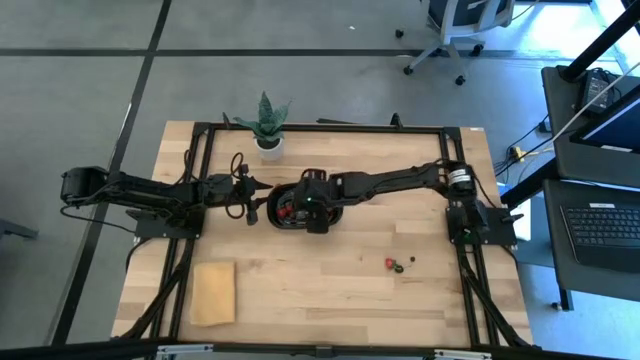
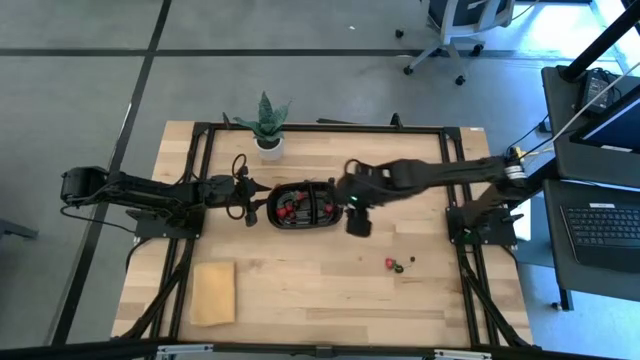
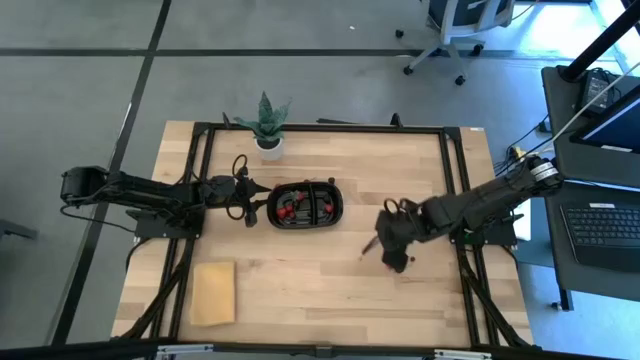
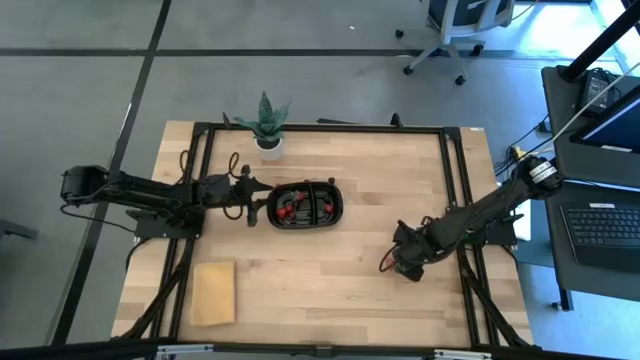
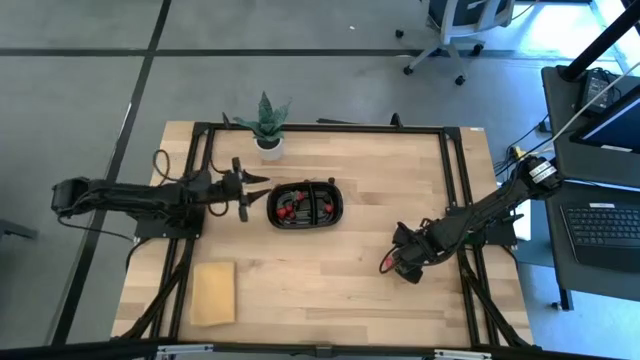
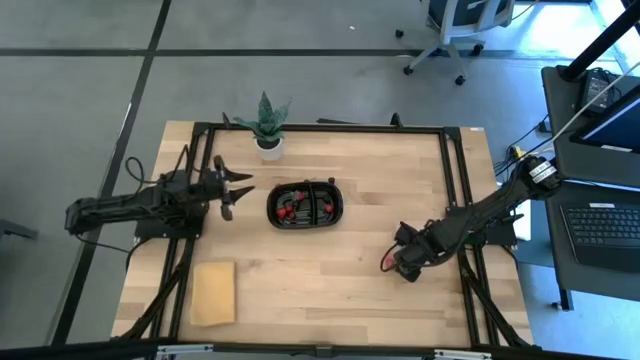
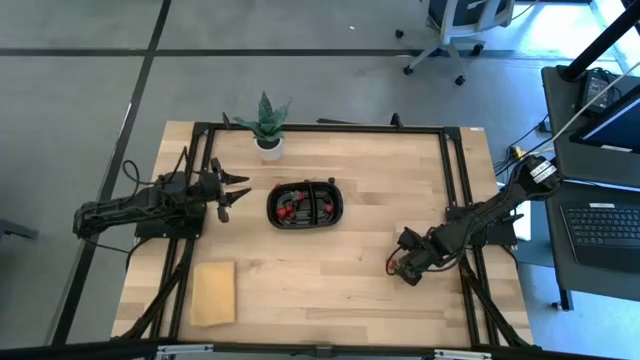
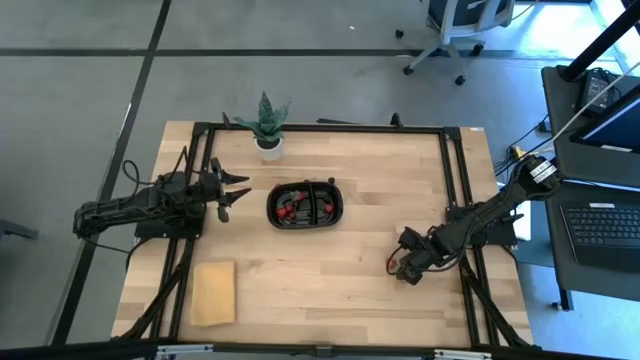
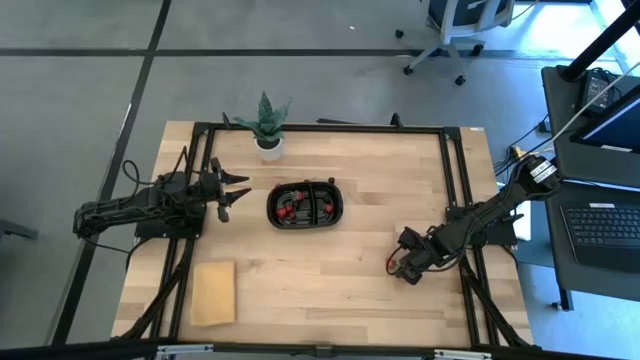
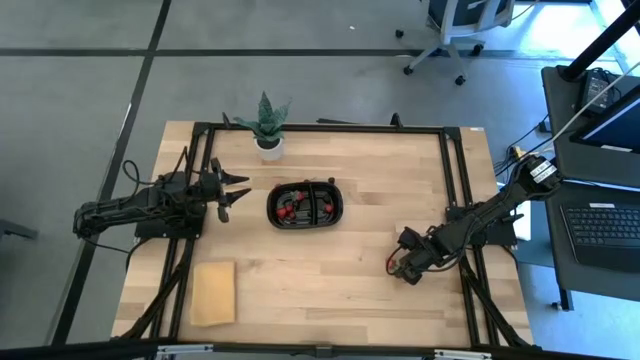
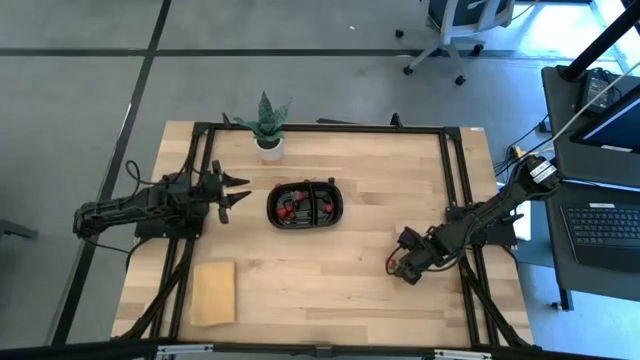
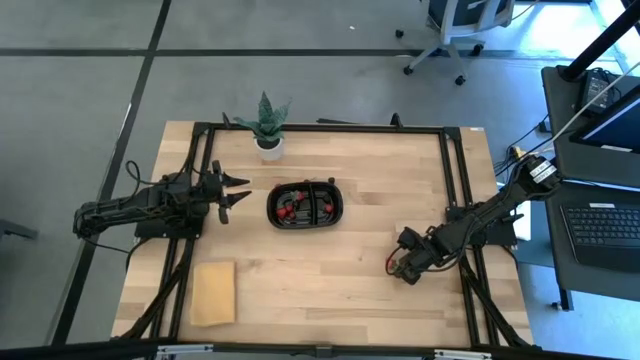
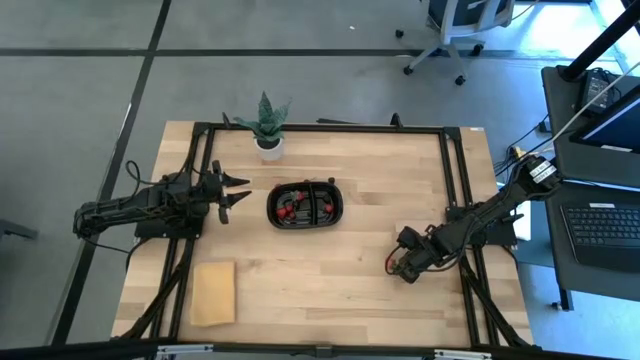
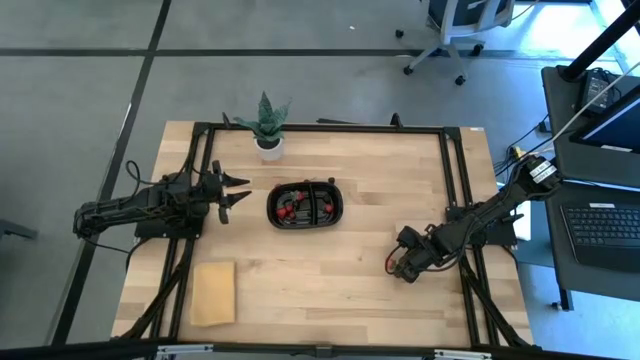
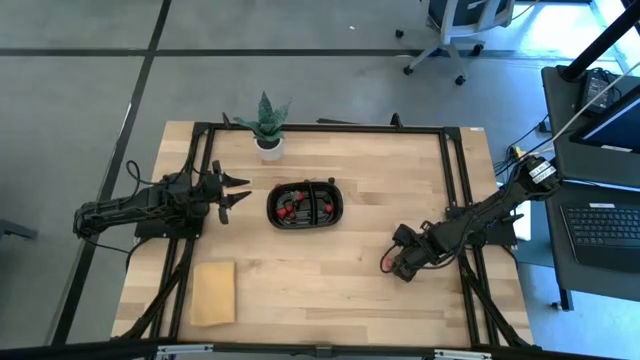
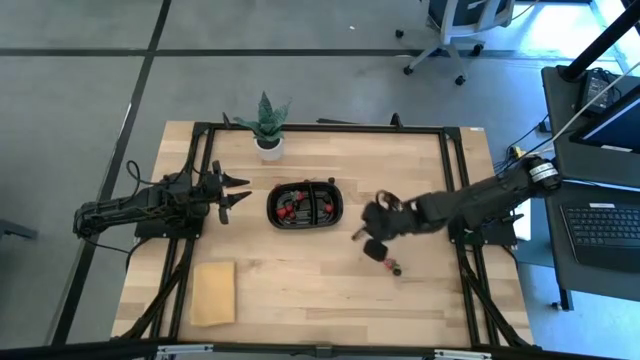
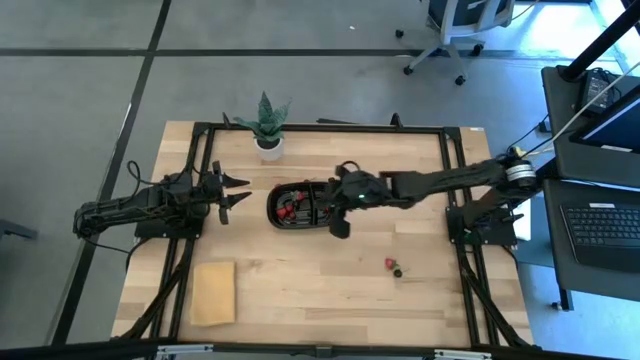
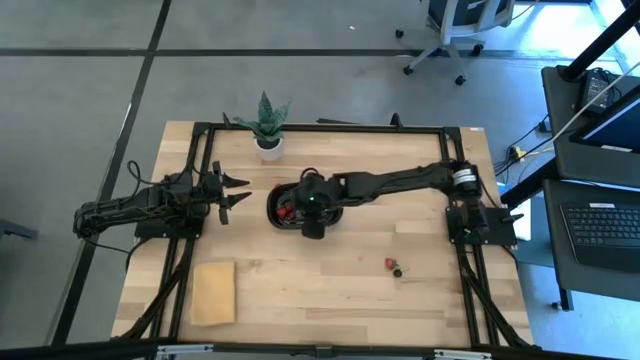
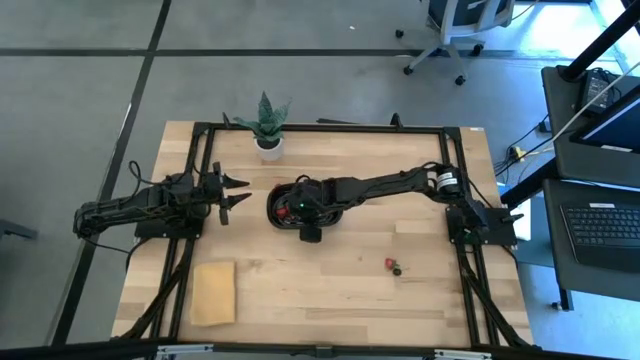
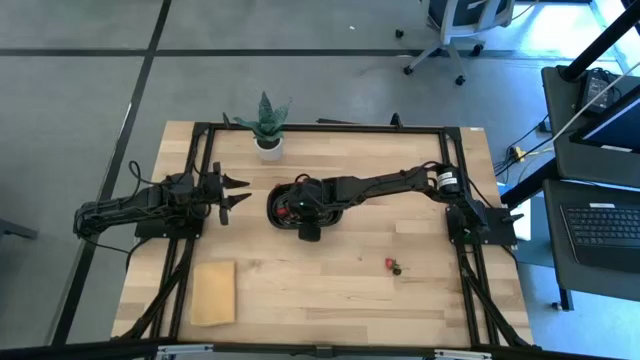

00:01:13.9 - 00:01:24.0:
Task: Pick and placing Produce into tupperware
Put the blueberry into the black bin

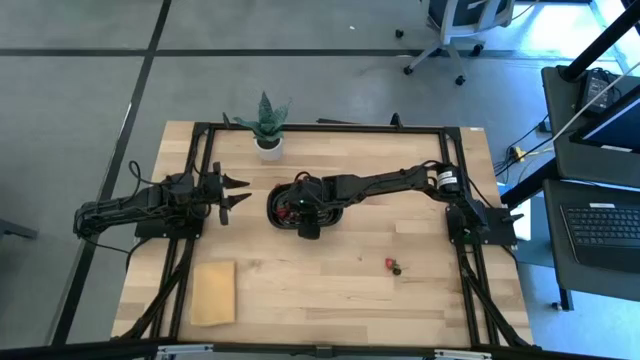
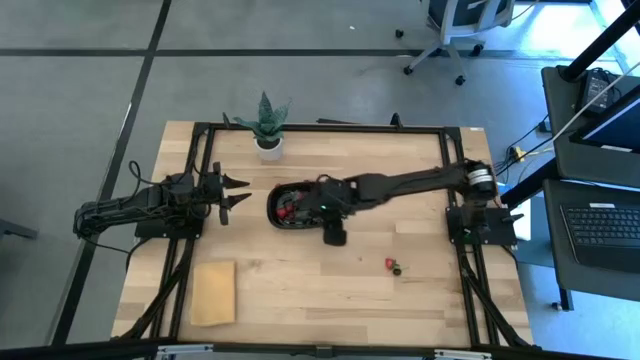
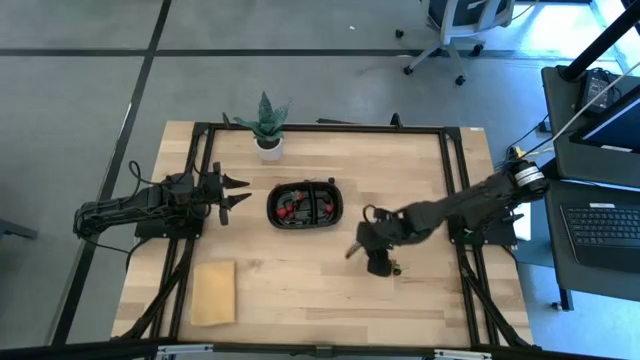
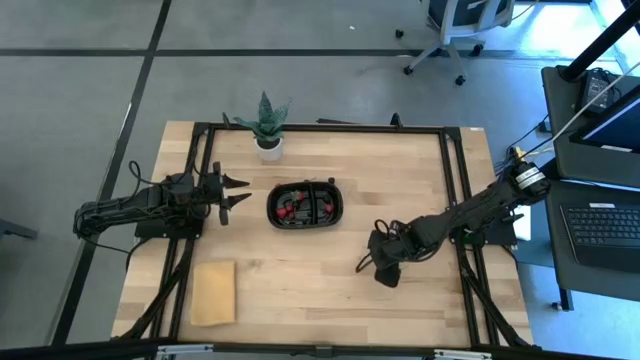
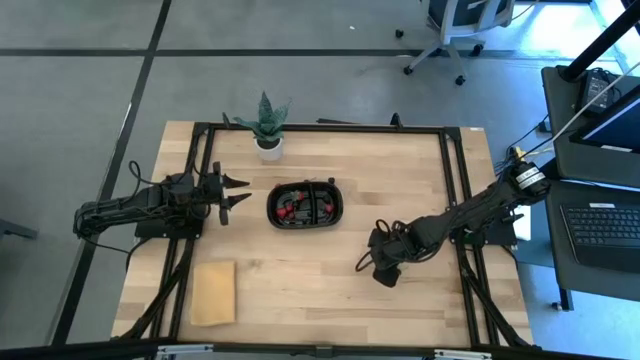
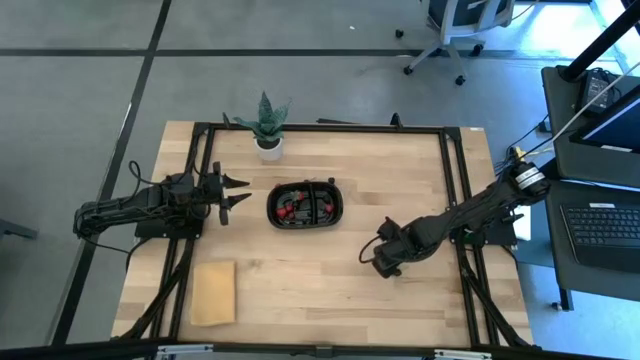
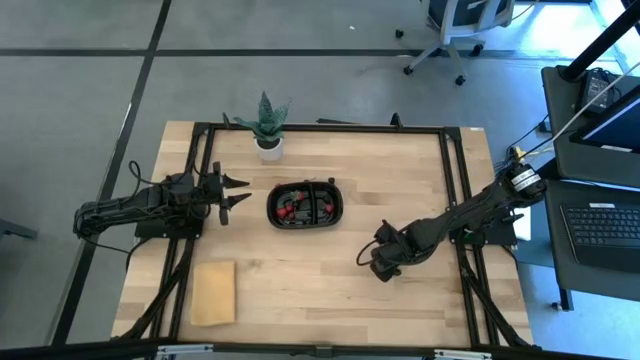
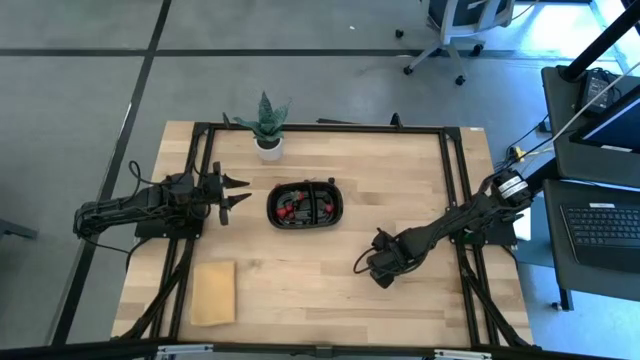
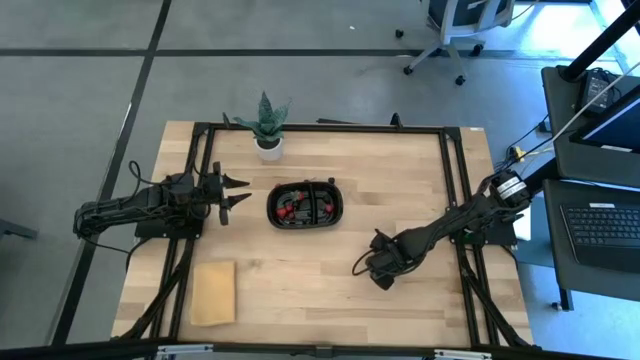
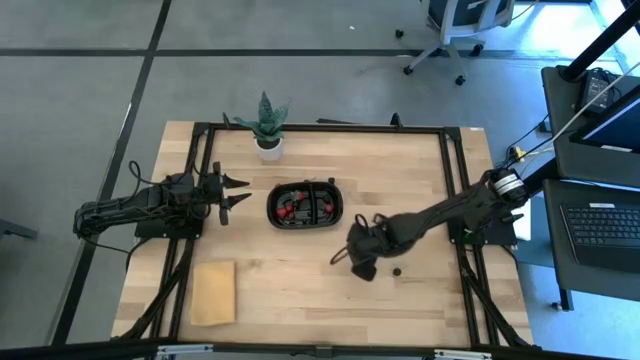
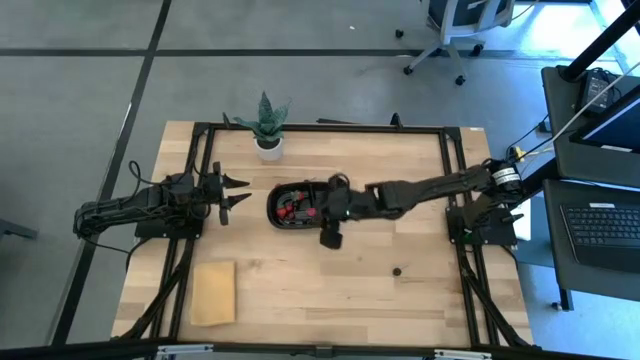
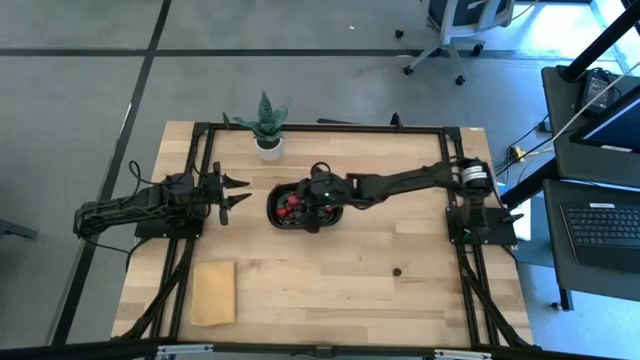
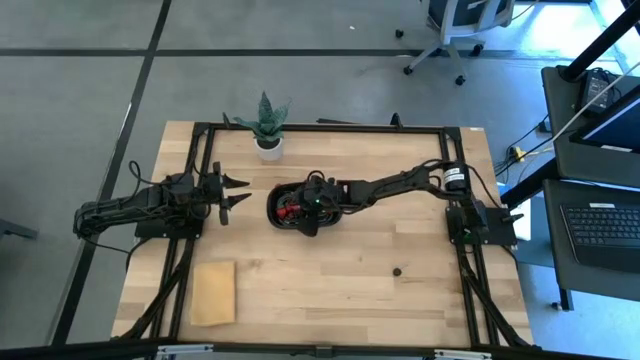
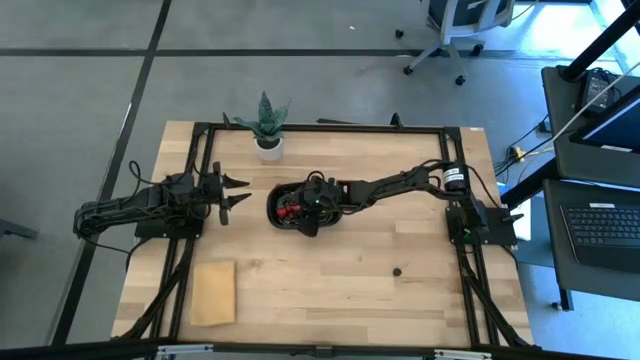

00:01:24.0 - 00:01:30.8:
Put the red strawberry into the black bin

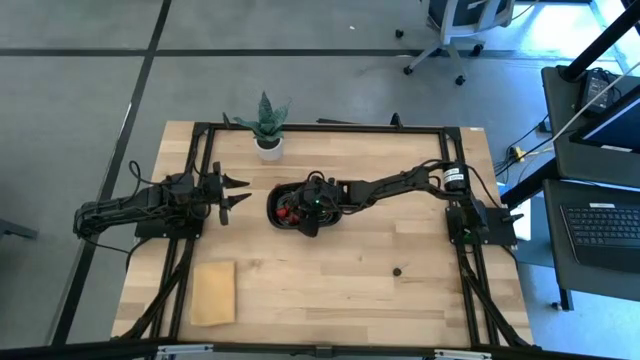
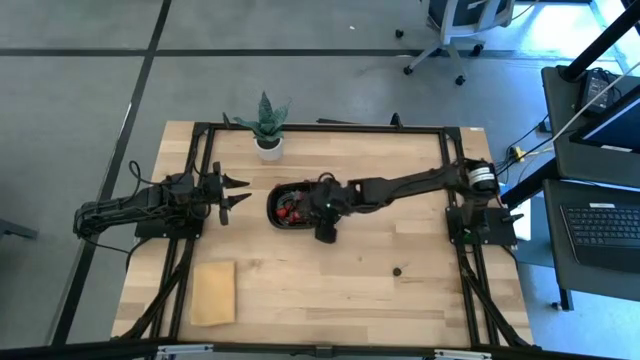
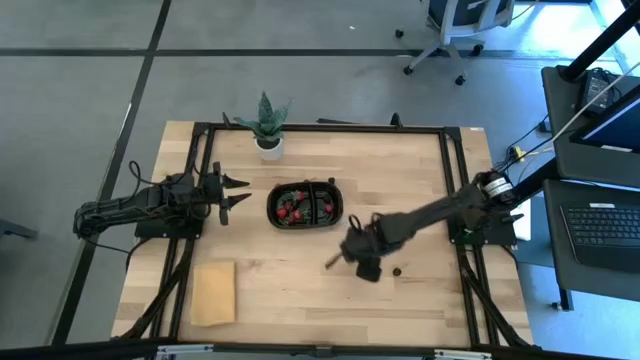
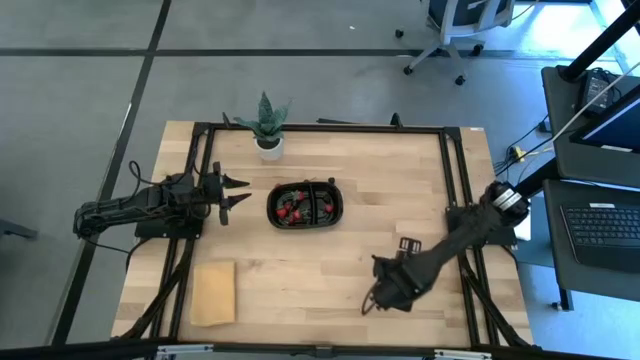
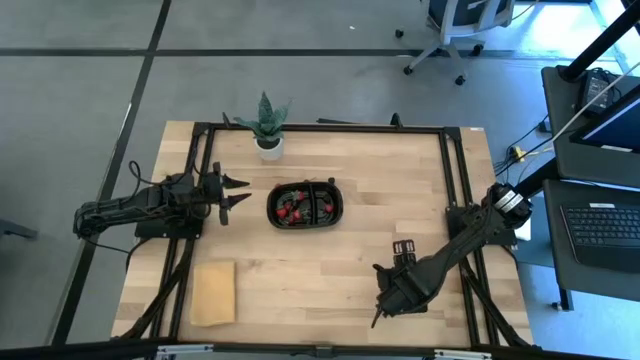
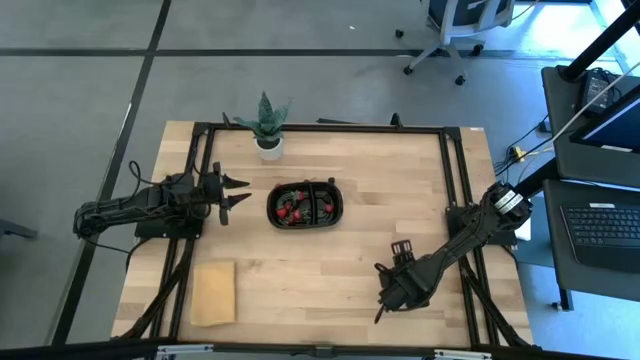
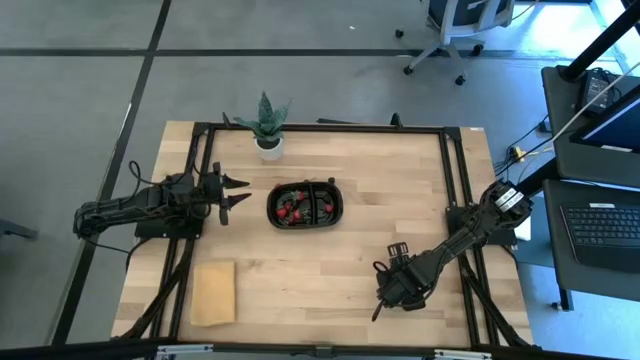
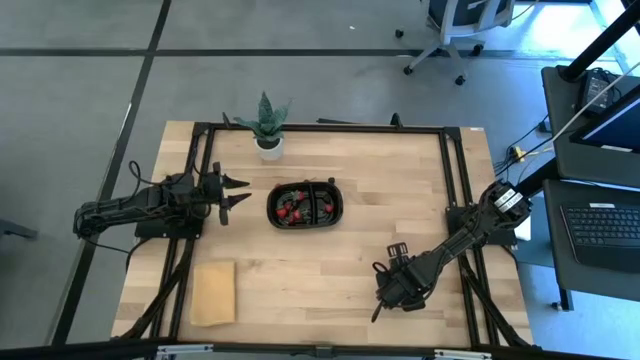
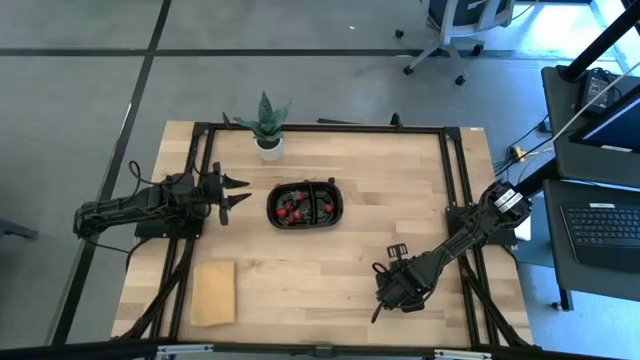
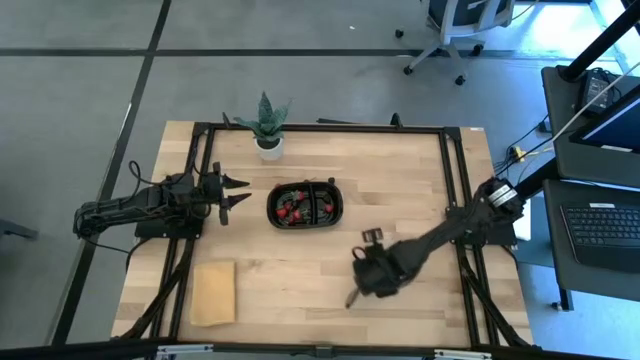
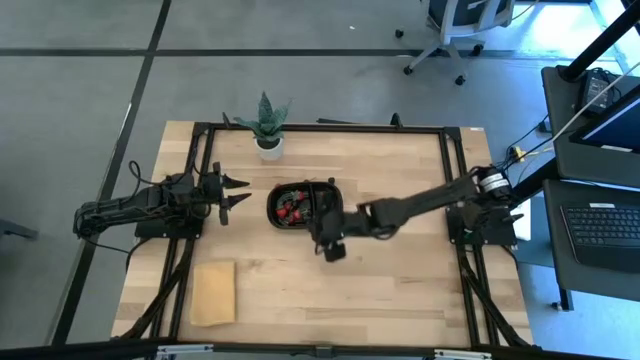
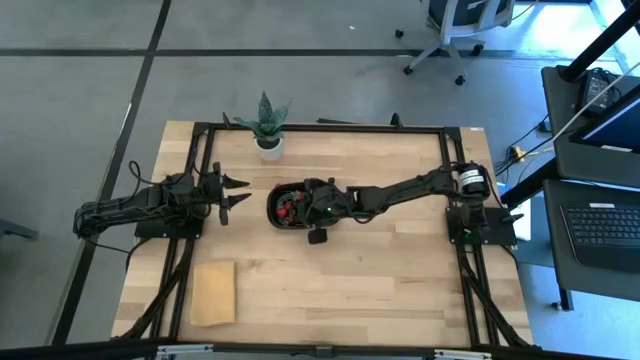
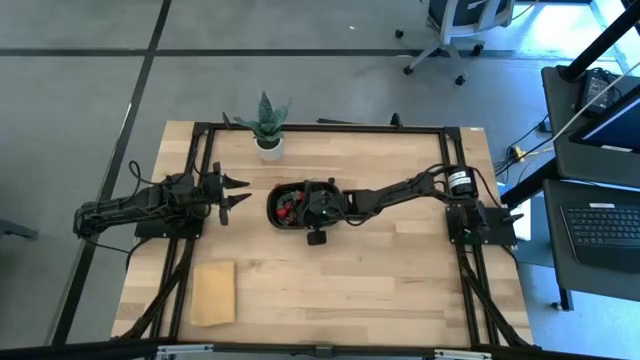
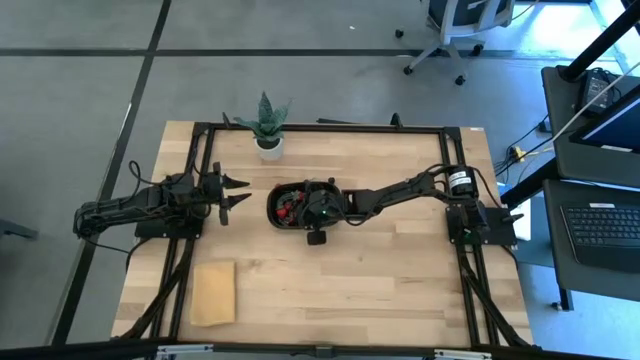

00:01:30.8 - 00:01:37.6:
Put the black cherry into the black bin
